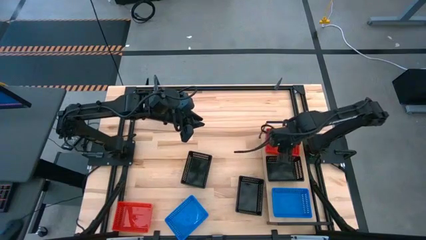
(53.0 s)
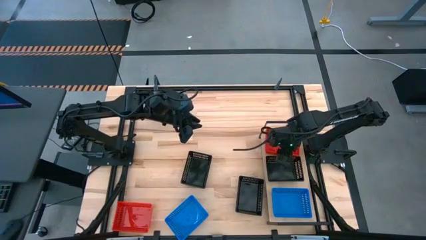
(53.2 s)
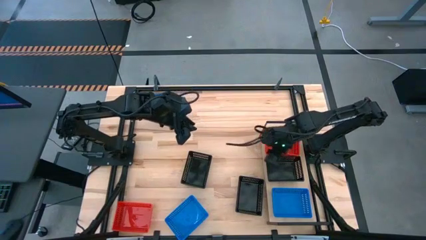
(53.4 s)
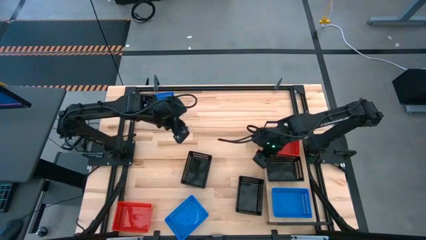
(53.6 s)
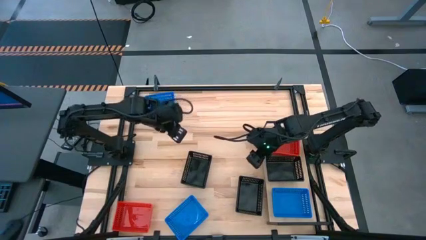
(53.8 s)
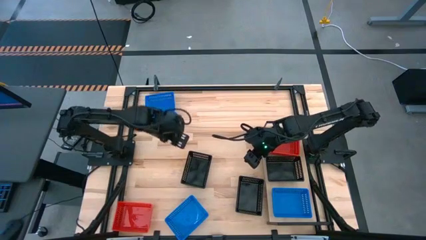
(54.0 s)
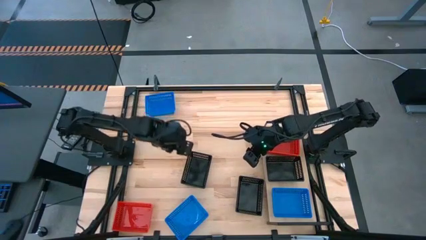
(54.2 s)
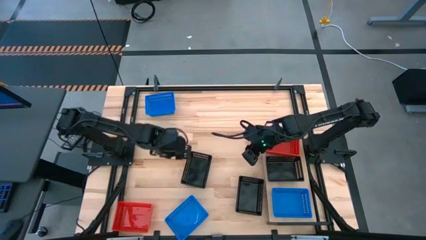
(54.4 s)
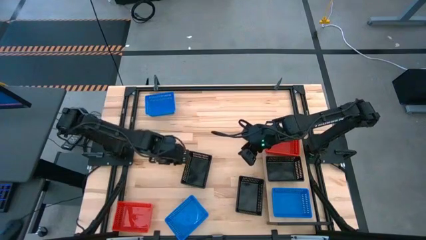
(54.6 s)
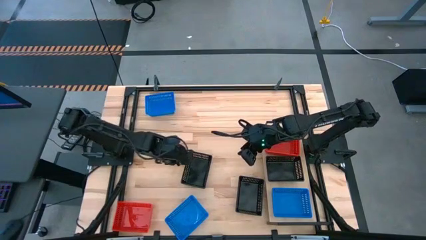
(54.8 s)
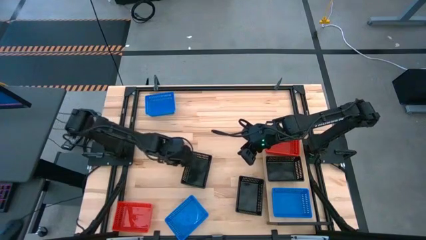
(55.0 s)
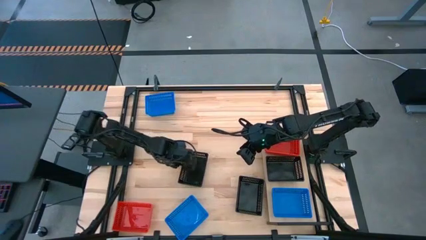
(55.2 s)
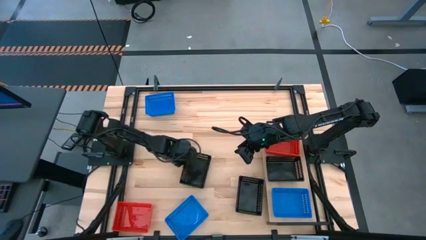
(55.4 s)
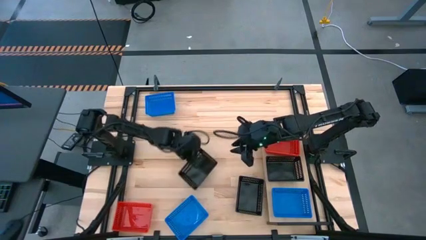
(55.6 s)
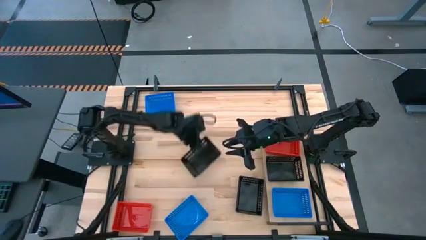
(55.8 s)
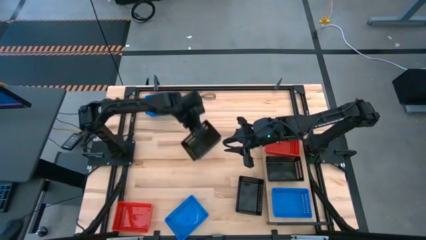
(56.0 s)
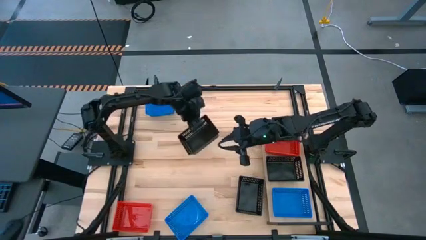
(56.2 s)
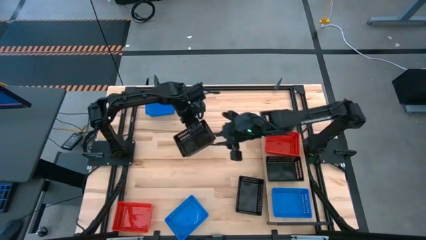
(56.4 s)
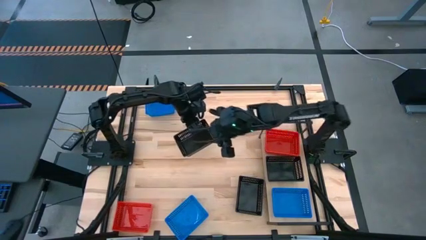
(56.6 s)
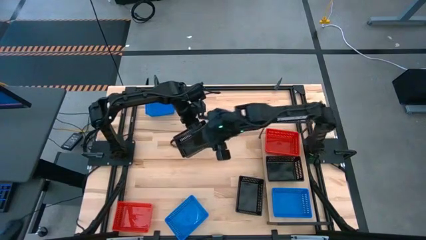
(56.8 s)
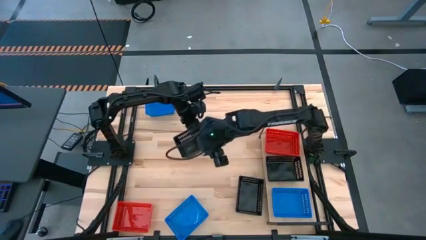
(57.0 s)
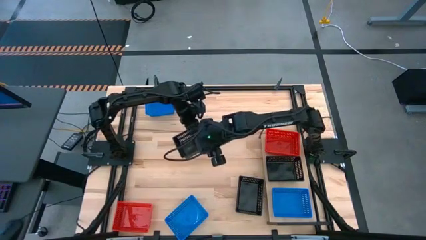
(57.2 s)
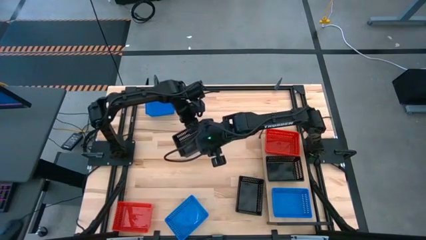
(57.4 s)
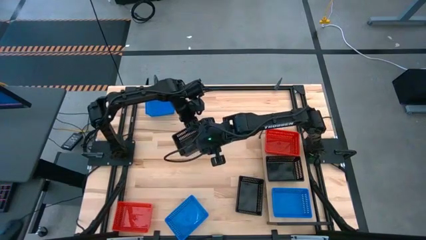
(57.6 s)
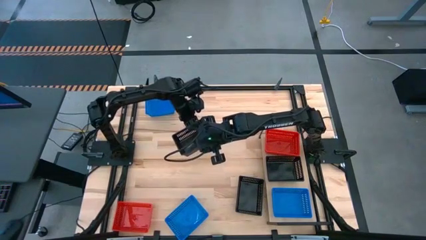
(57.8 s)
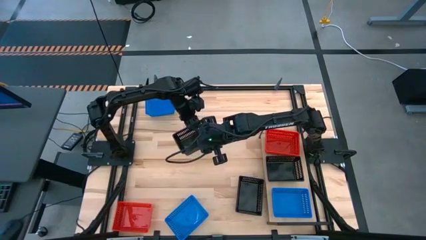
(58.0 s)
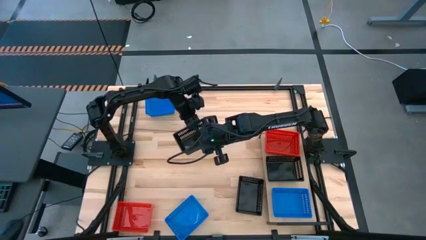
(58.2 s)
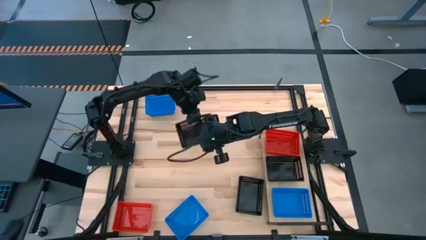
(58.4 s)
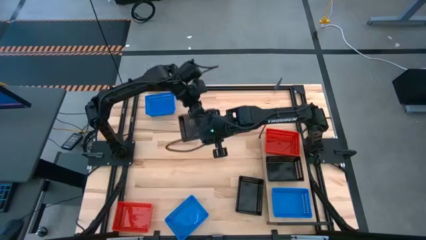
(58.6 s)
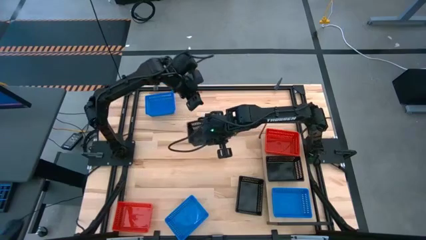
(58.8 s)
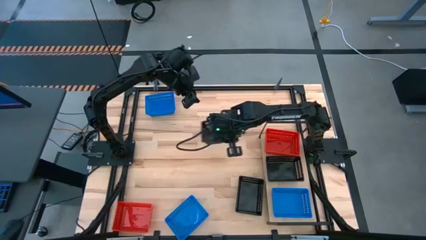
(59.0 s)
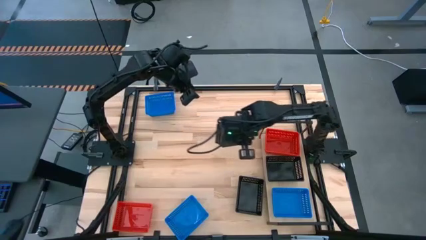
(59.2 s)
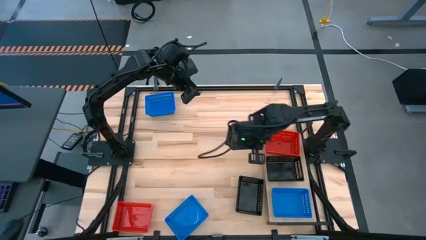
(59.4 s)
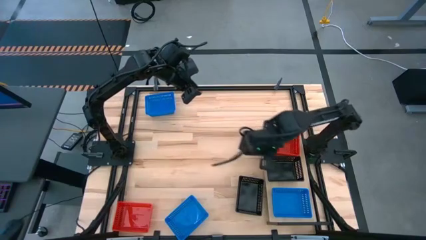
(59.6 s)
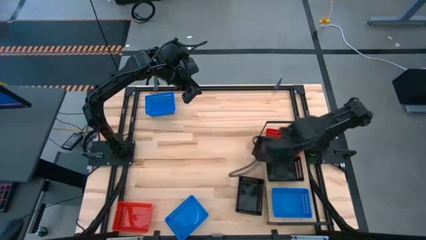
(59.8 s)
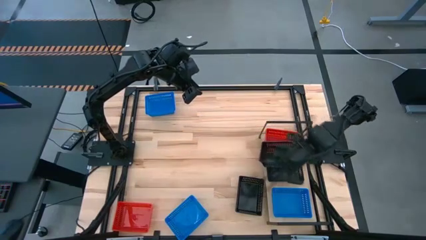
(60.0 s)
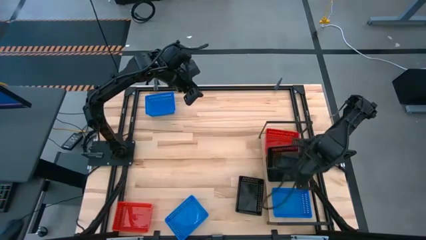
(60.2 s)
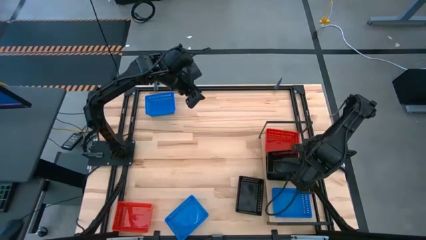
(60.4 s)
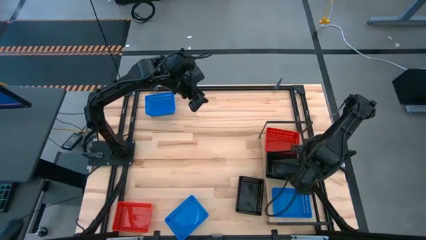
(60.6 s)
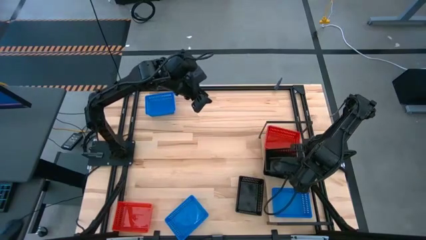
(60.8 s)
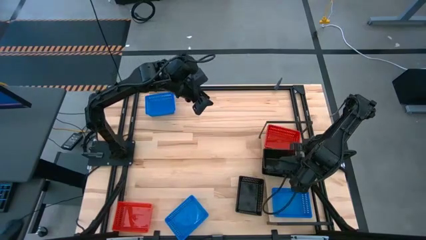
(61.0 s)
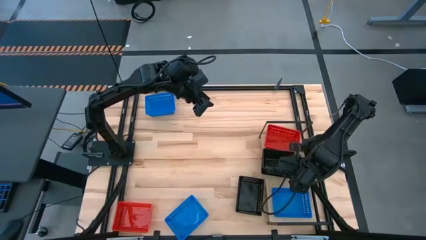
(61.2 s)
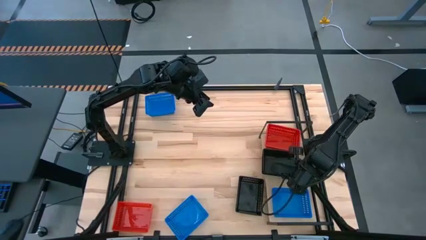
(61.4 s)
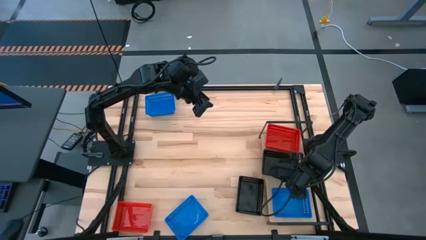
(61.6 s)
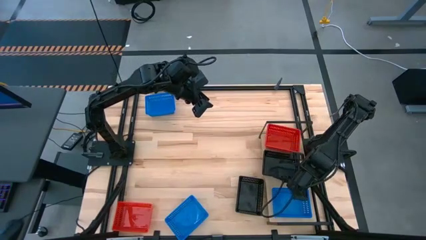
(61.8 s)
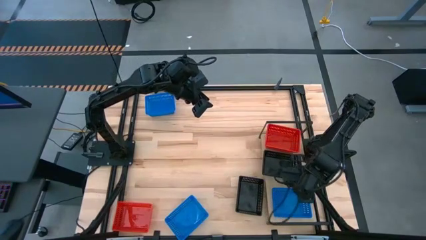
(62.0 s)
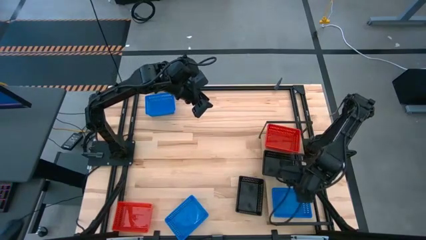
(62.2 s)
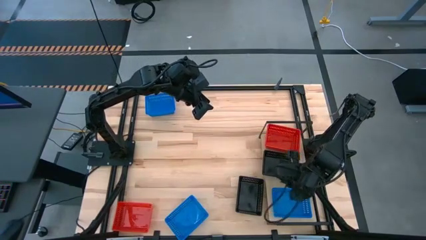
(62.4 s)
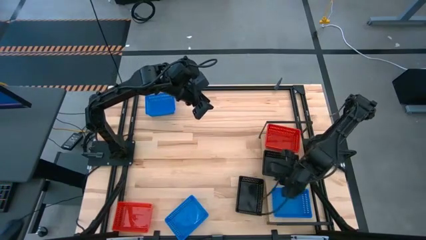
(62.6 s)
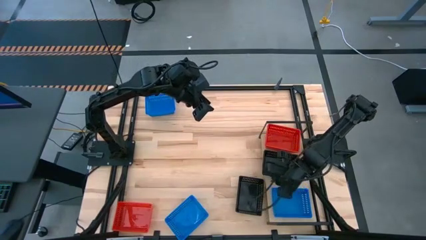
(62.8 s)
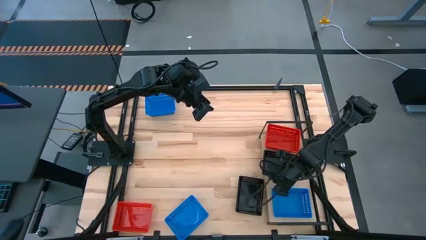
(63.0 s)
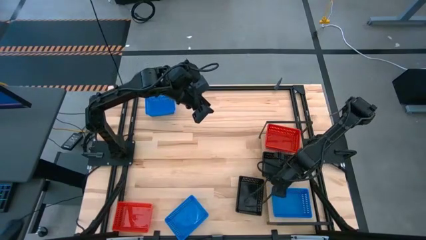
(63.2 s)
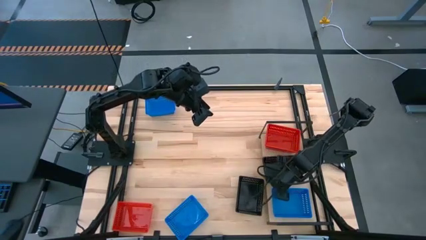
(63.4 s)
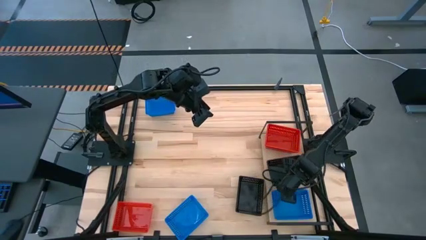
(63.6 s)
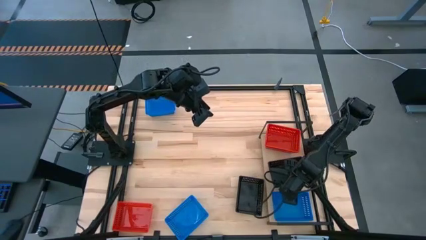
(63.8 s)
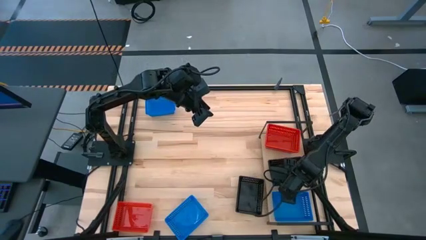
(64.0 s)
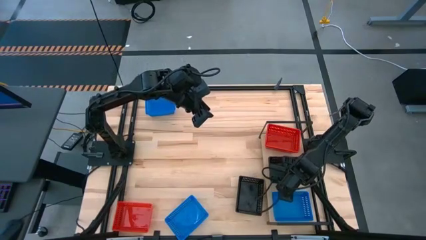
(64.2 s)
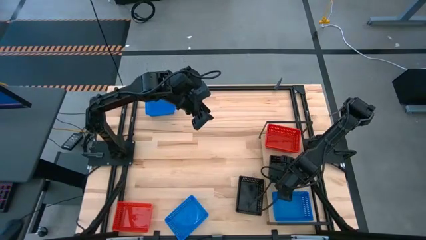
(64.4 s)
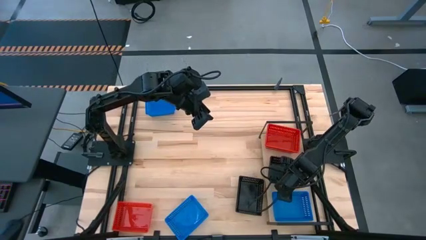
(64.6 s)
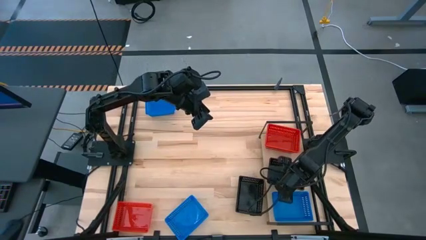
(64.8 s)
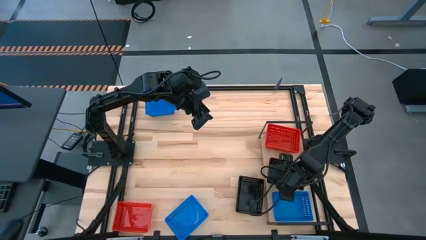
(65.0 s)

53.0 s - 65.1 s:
Task: Stack baskets on shelf by color
Stack the left black bin on top of the black bin on the shelf

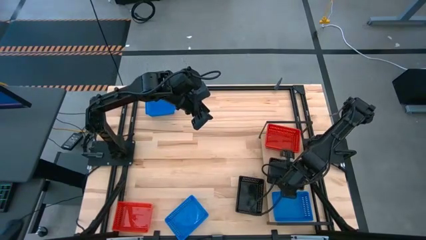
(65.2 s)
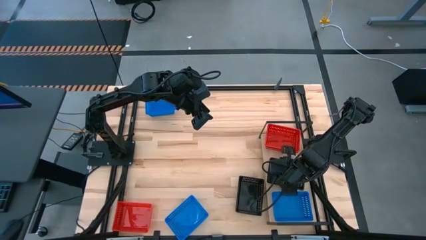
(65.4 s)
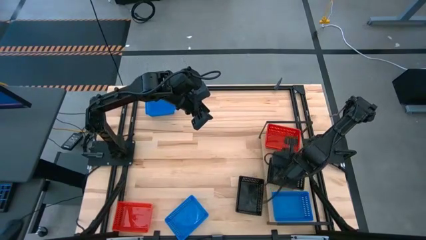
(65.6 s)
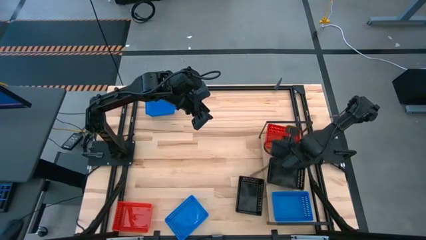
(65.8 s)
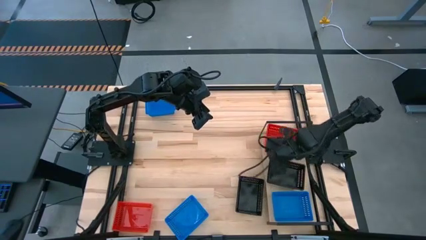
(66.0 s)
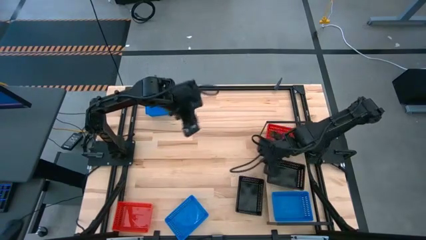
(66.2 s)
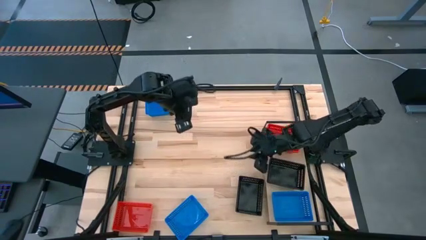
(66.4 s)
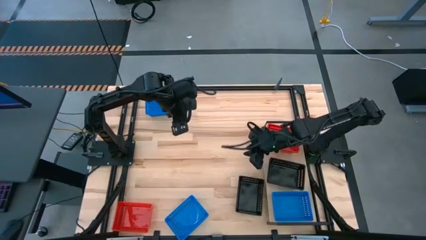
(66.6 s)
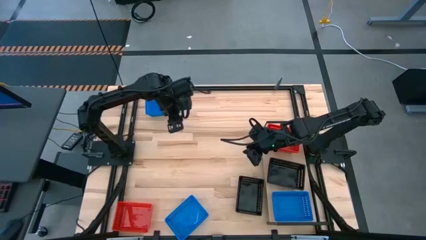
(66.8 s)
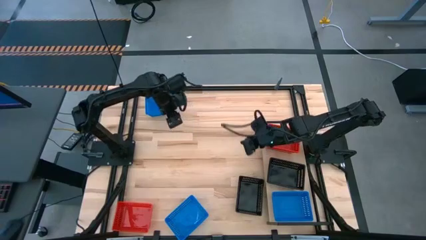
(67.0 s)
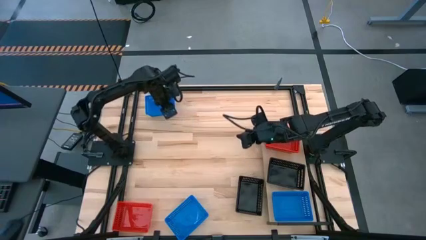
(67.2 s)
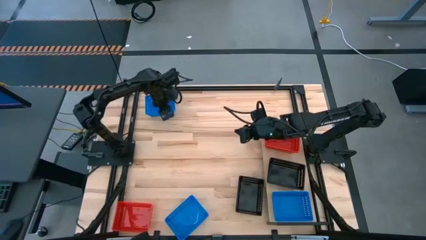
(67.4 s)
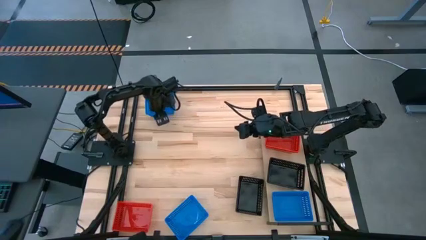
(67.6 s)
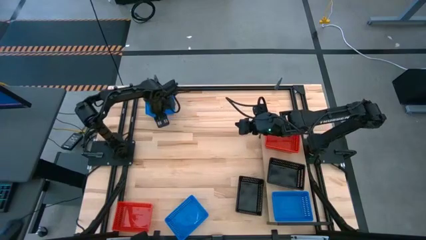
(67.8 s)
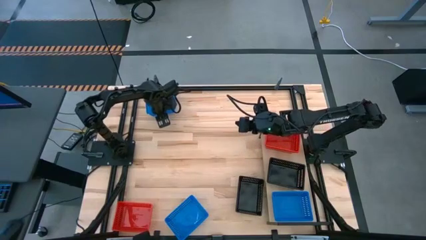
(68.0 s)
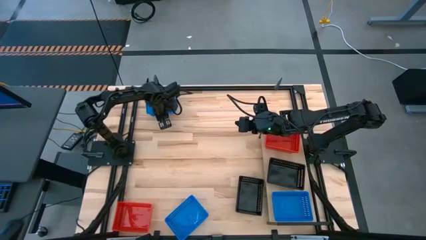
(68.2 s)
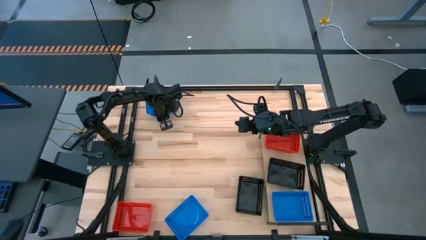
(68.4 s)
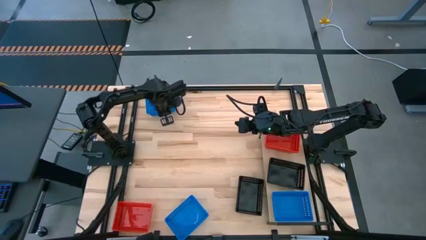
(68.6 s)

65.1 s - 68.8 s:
Stack the top blue bin on top of the blue bin on the shelf

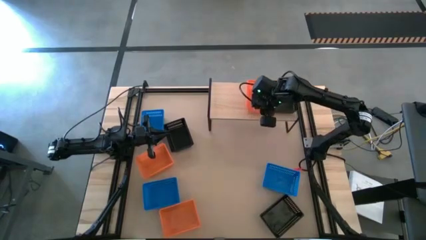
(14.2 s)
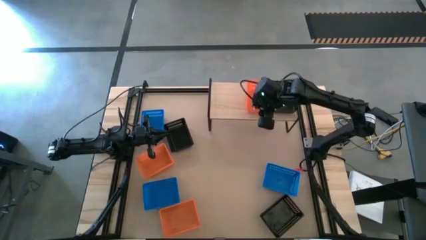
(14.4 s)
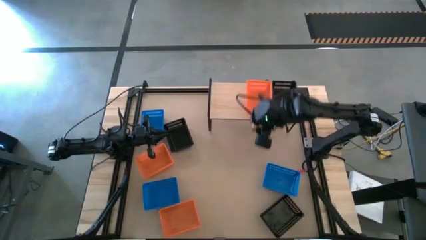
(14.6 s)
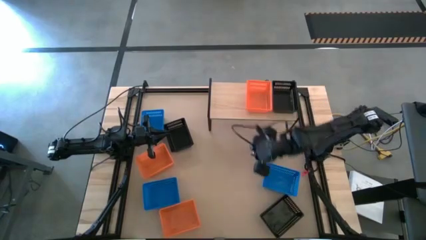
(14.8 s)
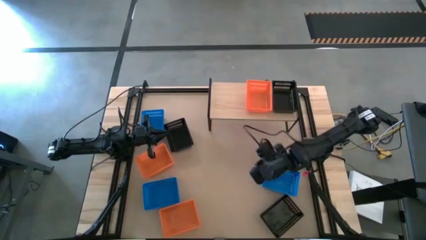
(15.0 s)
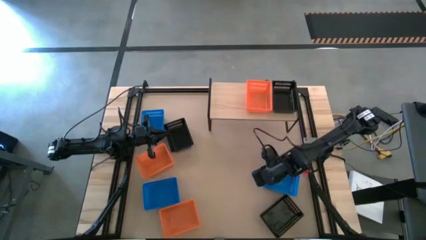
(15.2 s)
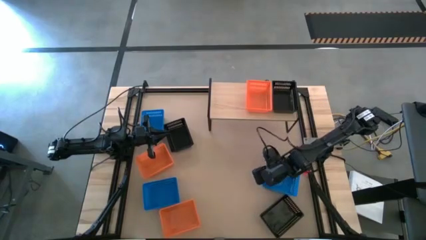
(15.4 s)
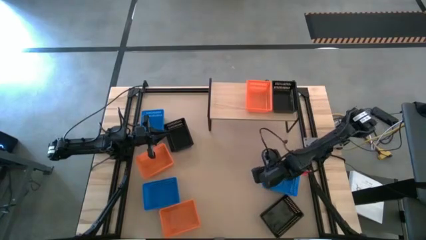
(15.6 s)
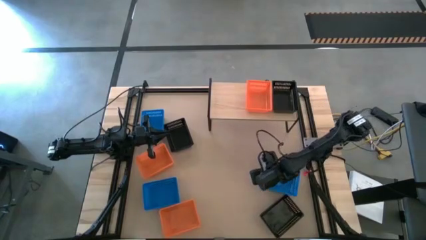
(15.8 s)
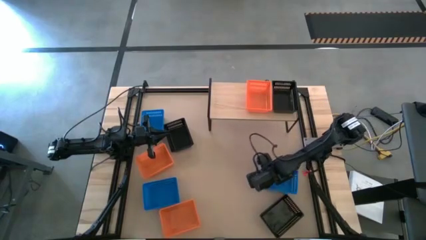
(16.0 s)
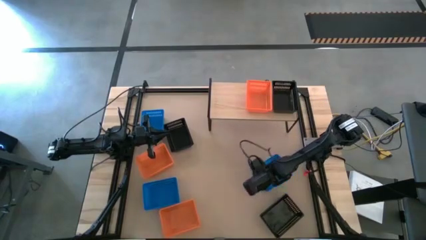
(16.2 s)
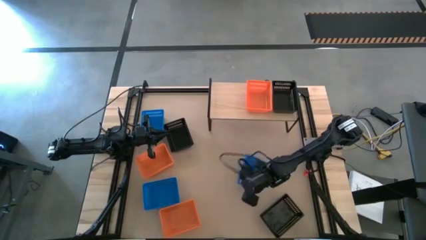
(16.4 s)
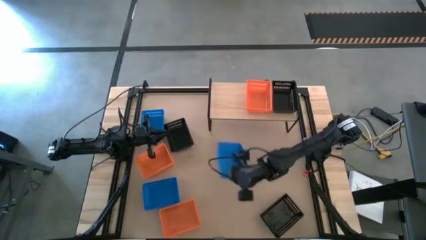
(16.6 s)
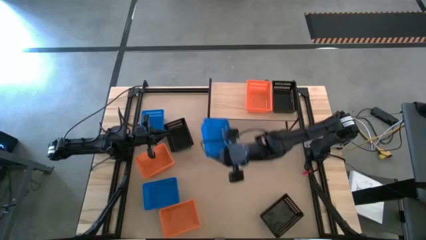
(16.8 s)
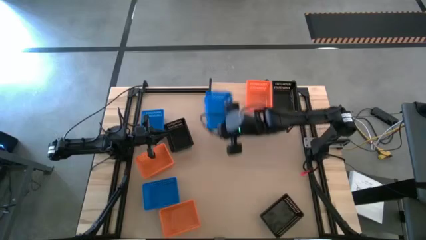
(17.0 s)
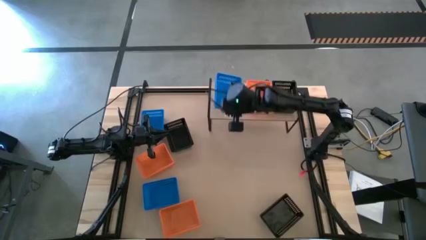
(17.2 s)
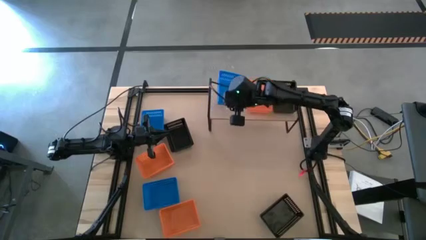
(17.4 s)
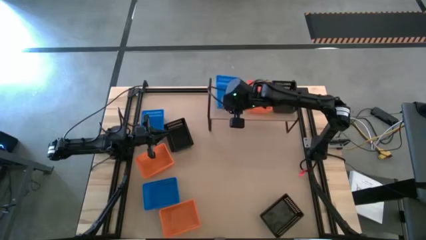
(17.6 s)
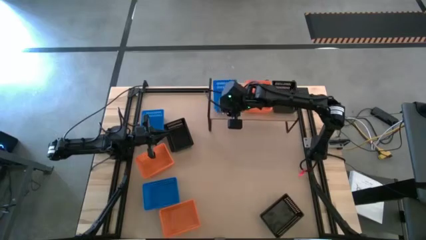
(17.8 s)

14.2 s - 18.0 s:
Task: Stack baskets on shelf by color
Put the bottom right blue bin on the shelf
